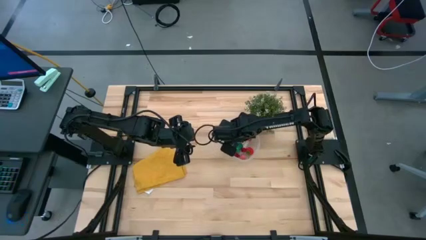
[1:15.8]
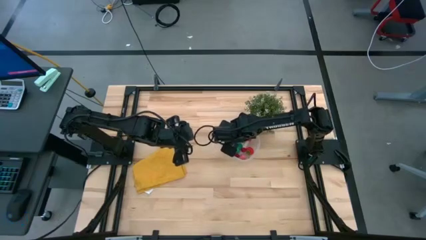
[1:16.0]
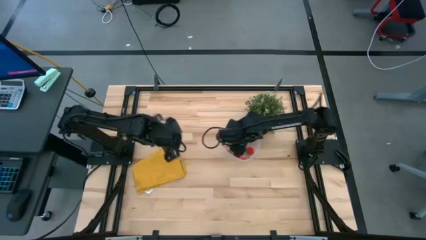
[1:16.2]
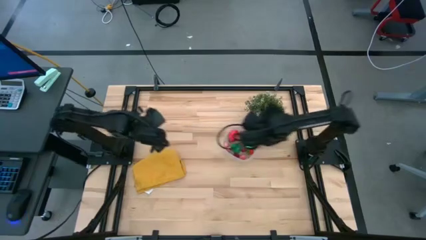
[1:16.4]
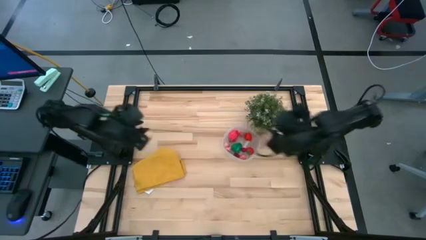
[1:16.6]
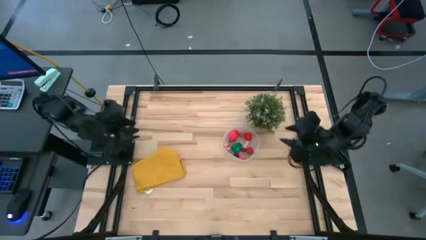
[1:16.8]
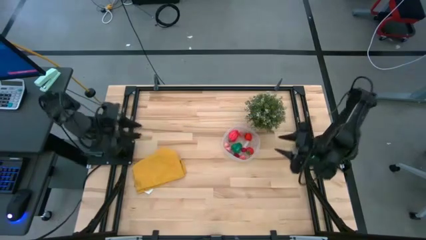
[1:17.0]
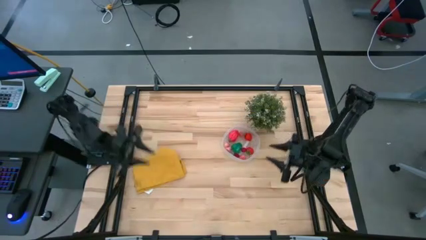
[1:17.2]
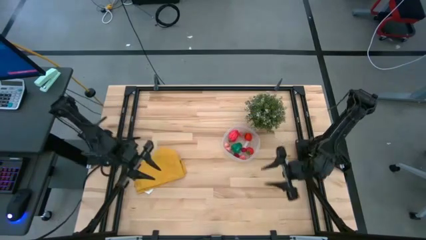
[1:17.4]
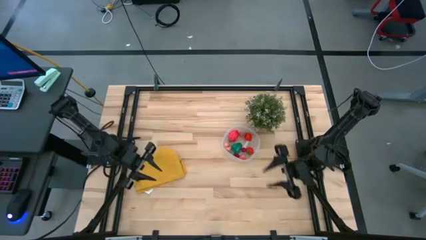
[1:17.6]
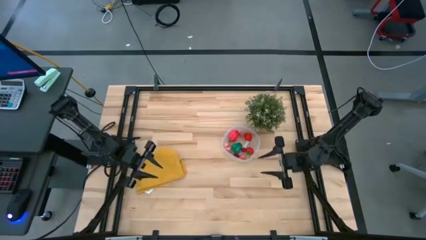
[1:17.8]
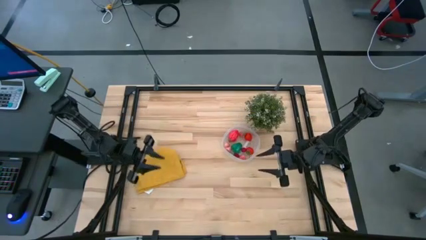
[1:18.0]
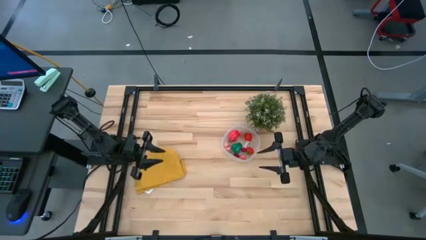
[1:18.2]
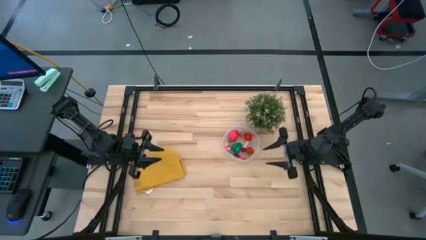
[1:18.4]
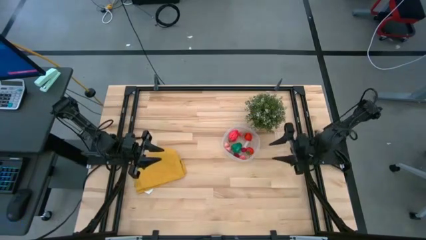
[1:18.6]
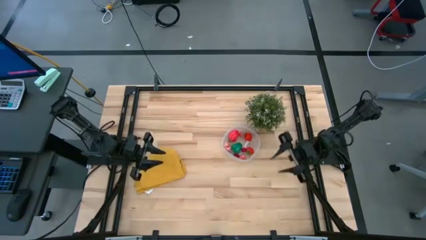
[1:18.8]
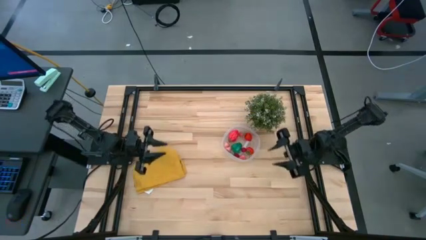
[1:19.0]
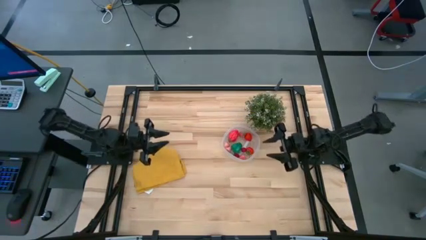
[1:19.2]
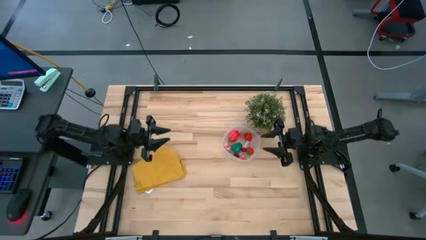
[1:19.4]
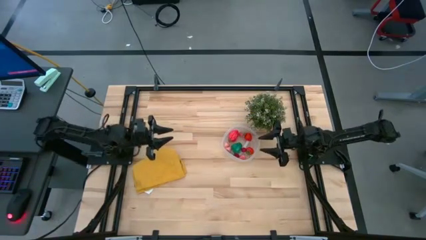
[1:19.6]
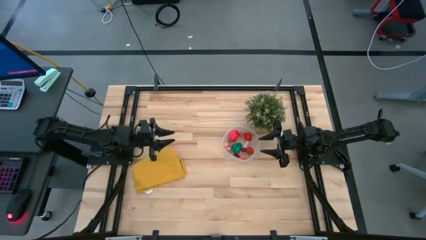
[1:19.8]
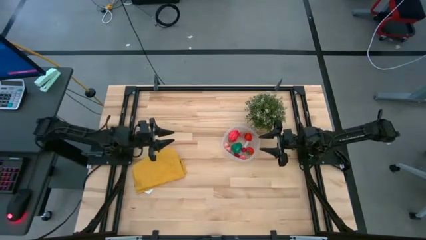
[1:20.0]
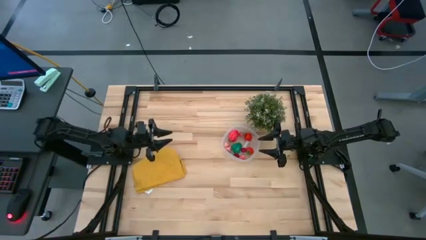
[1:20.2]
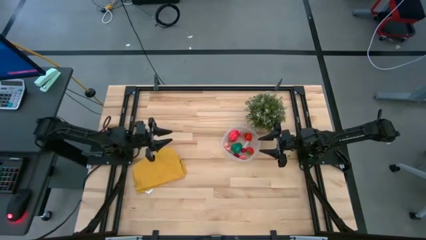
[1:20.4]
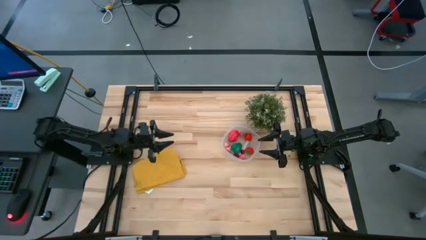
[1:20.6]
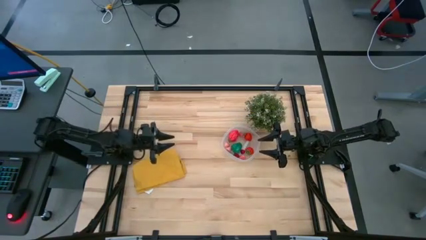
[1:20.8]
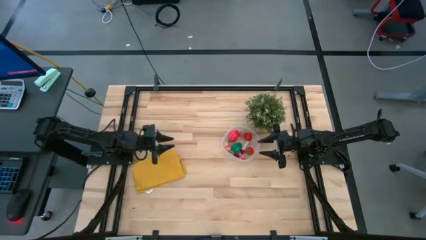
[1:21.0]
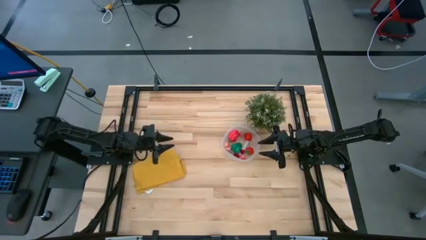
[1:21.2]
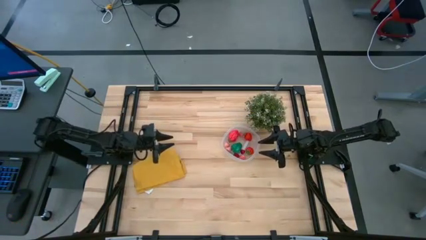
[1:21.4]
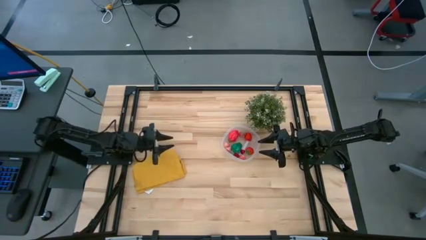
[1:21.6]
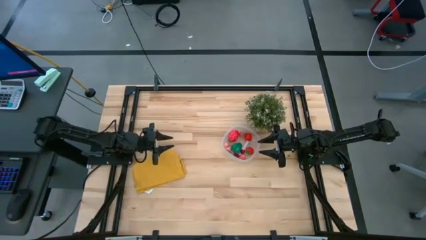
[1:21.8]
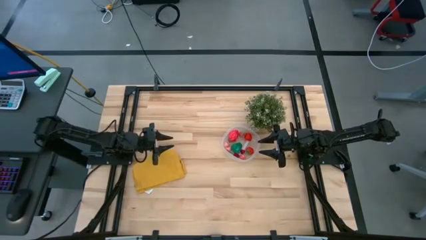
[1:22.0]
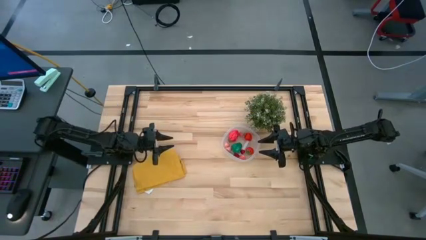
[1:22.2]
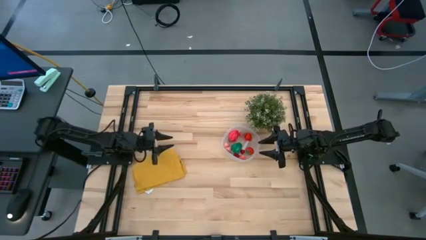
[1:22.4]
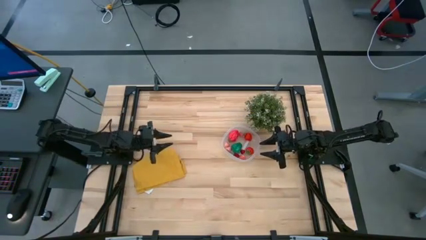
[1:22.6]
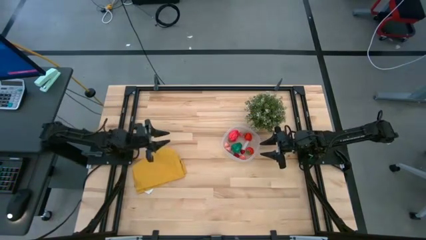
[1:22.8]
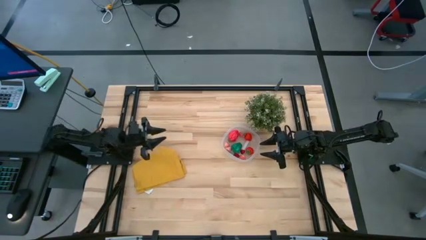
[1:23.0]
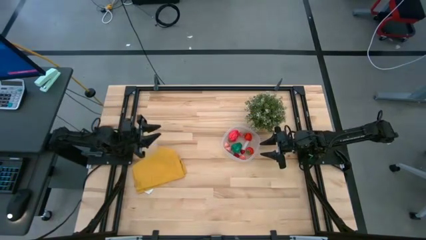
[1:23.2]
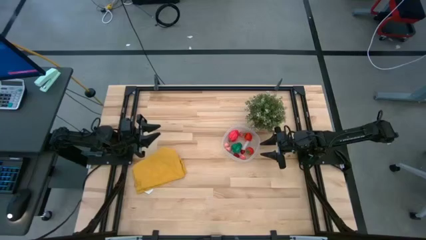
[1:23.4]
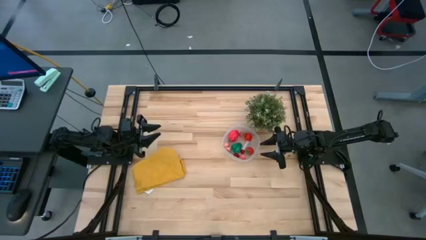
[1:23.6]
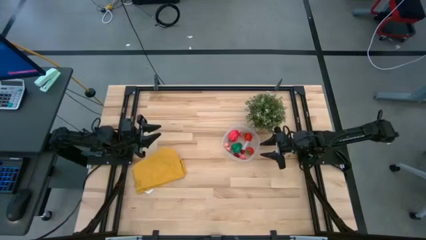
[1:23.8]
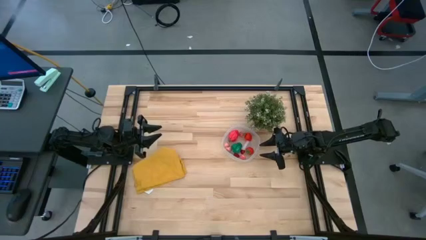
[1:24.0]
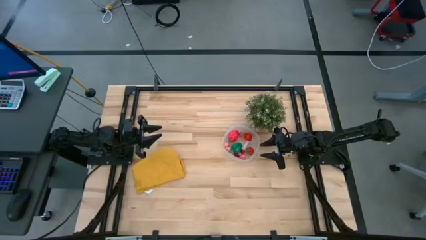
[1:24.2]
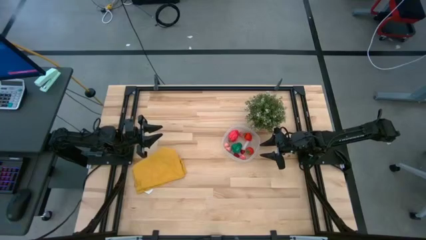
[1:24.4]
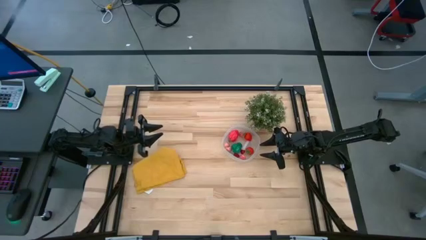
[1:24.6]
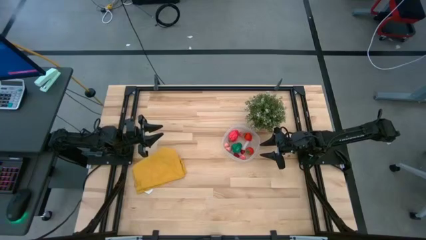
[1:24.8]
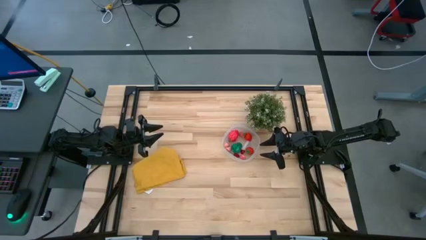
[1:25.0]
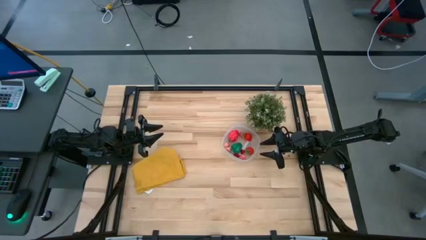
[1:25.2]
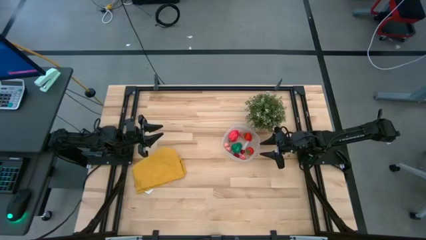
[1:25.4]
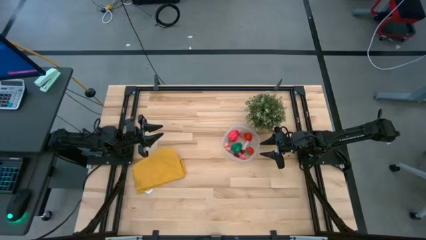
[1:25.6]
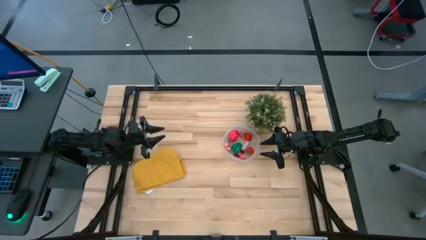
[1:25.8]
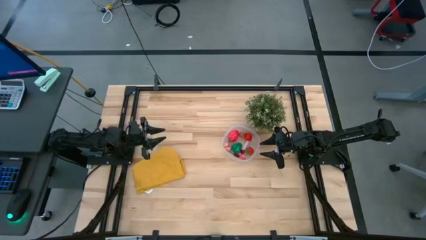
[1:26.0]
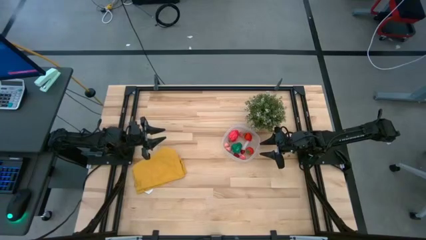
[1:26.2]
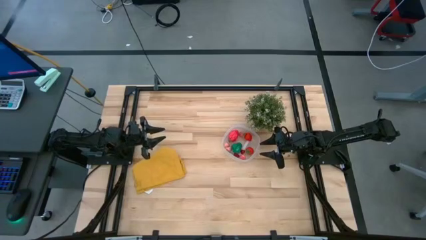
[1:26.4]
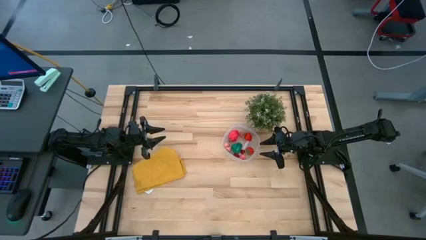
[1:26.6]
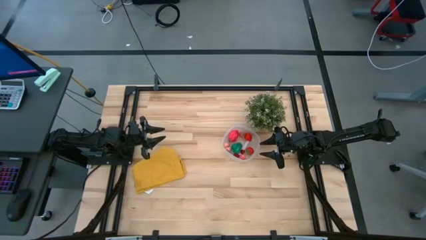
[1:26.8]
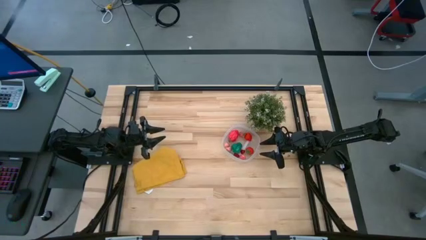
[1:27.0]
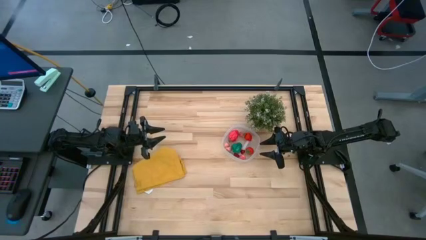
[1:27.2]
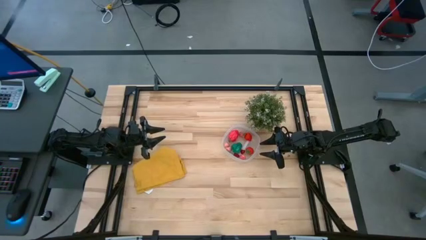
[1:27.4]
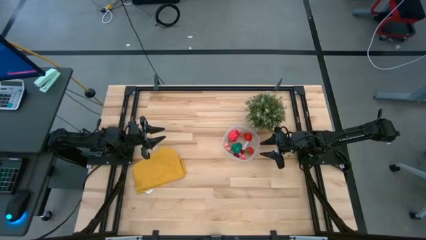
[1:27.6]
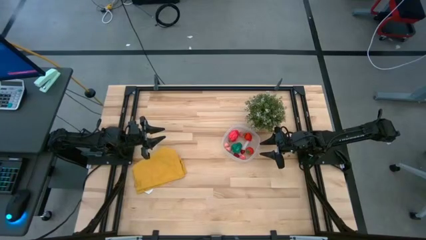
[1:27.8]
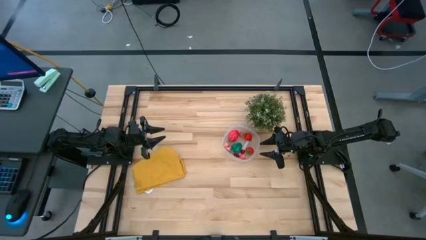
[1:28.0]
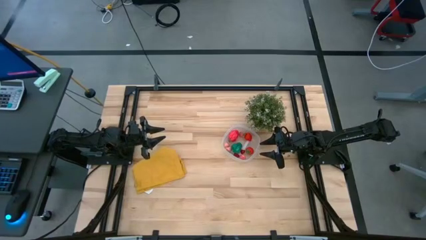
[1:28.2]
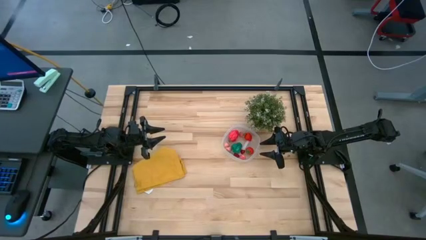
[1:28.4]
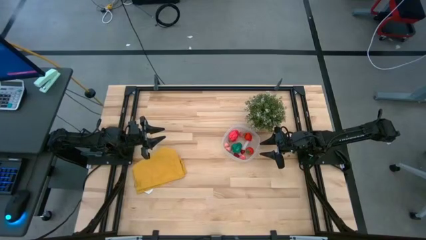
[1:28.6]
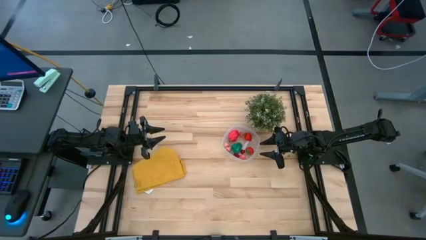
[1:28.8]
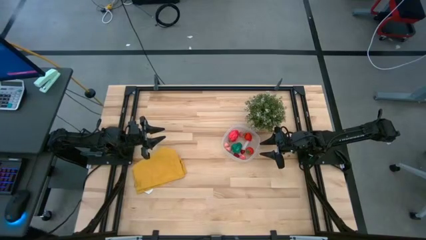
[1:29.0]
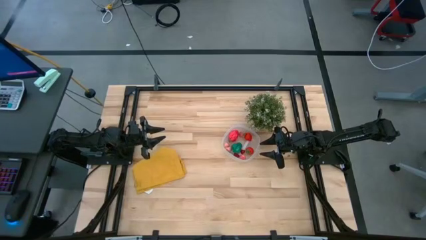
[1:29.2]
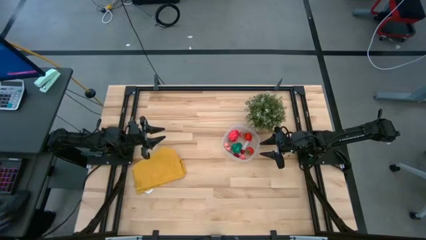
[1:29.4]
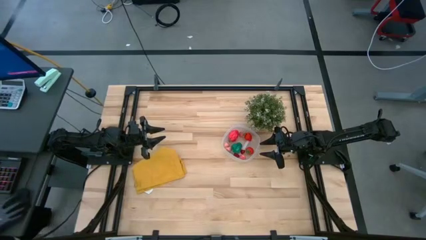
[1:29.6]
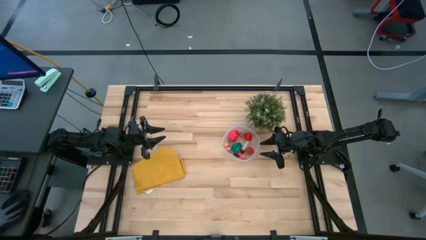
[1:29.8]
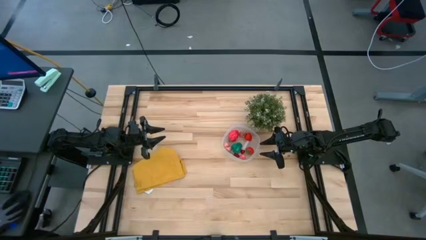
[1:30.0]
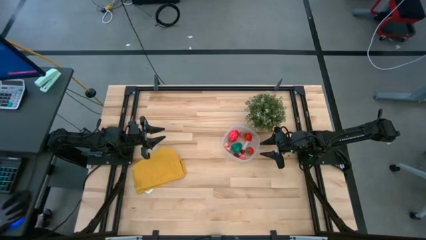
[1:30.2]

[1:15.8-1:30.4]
Task: Pick and placing Produce into tupperware
Return to Home Position

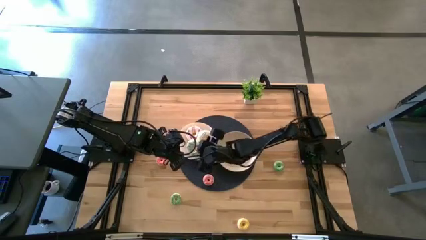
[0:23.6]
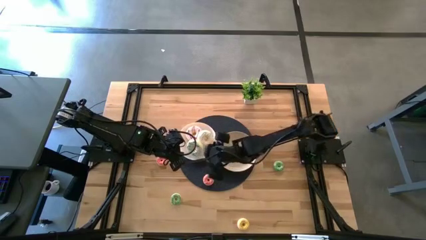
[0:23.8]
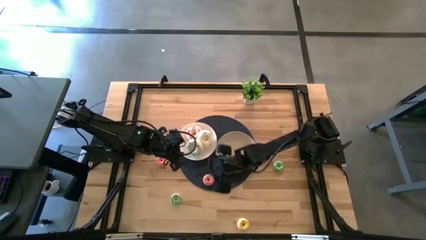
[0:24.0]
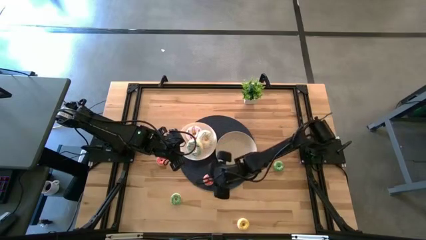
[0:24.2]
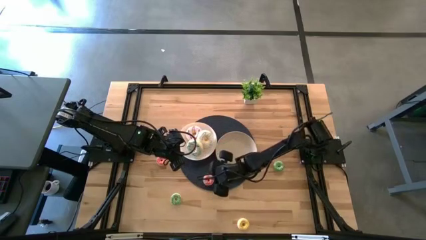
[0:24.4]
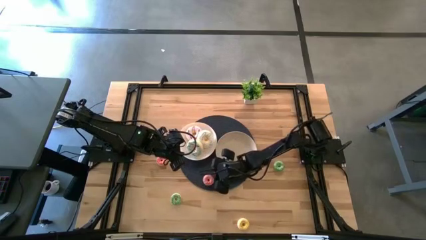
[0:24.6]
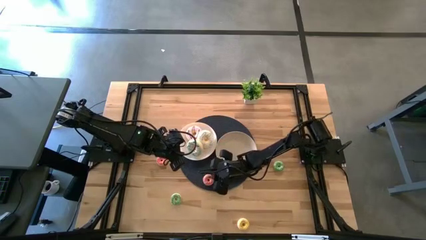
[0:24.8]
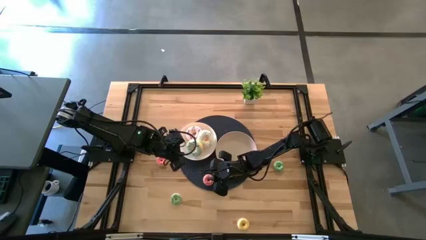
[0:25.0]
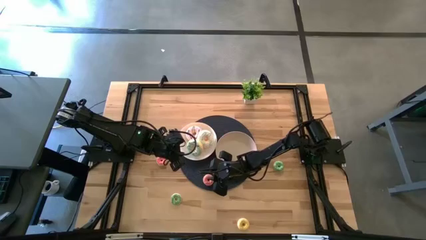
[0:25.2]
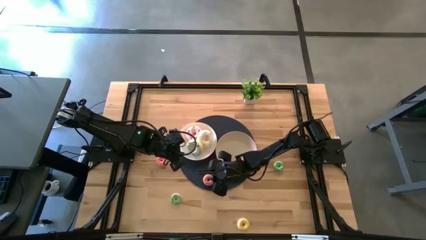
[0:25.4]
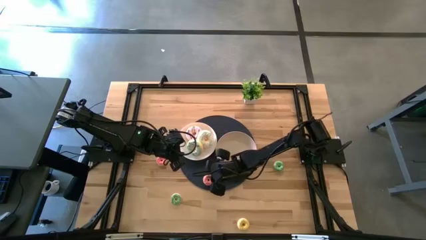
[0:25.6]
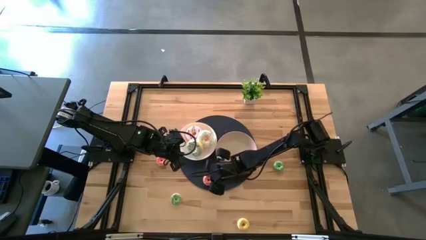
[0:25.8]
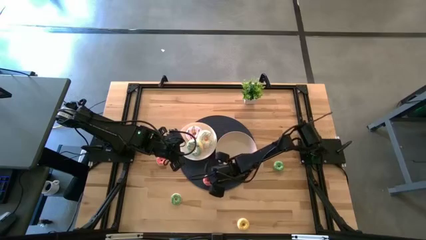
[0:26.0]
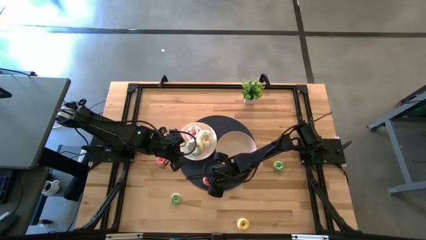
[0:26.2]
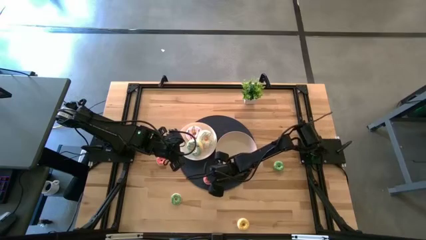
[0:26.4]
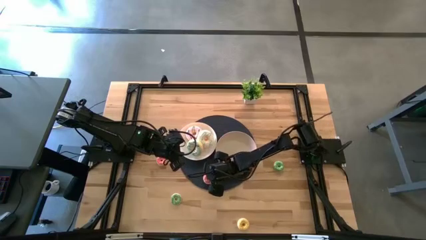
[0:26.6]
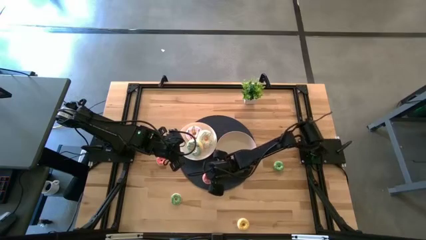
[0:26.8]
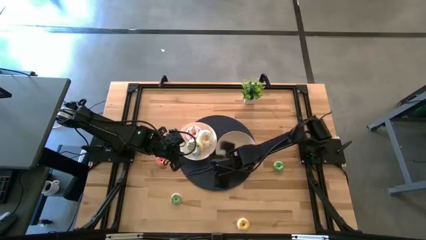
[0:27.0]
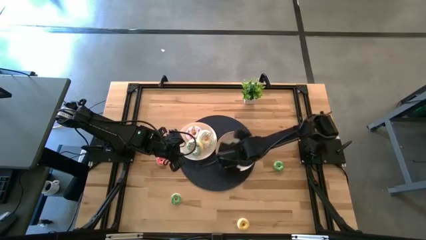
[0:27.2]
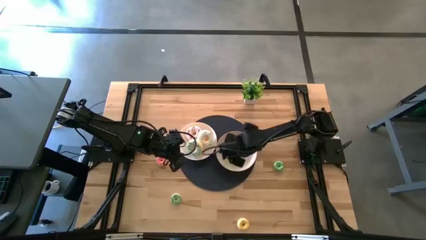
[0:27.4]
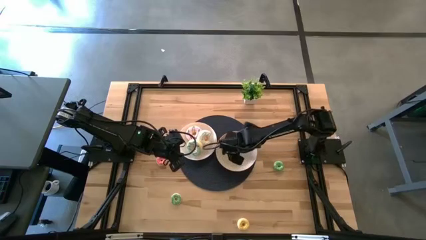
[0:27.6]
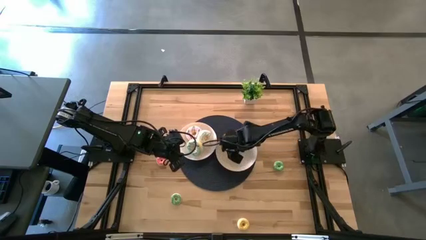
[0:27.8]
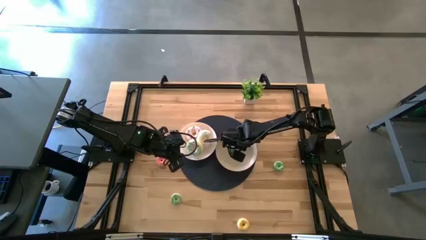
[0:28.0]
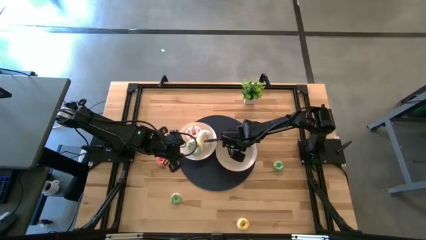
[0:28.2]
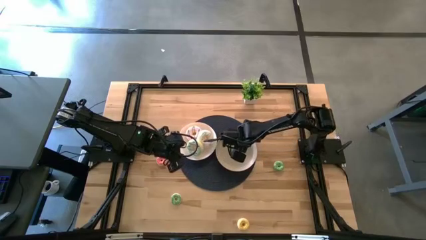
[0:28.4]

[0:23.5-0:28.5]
Task: Pick & Place donuts
Put the right small pink donut on the light brown plate
